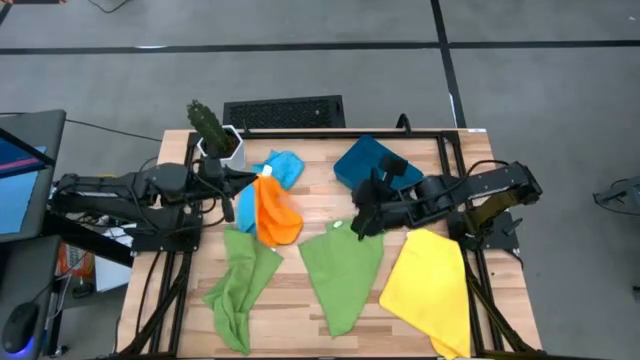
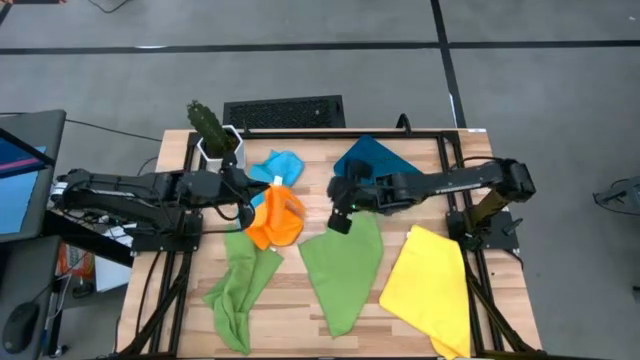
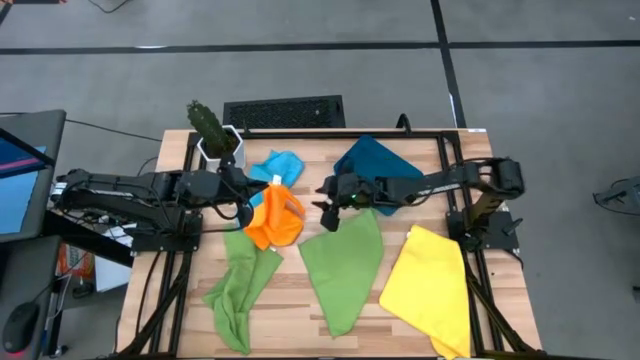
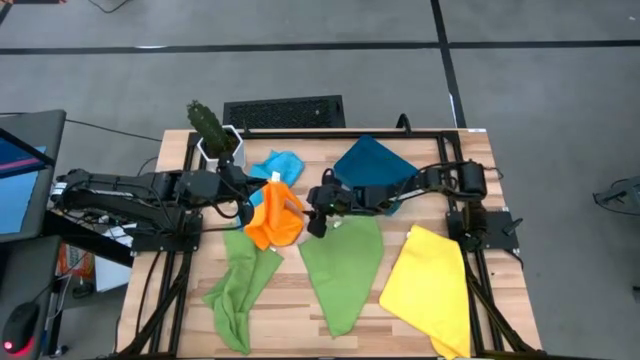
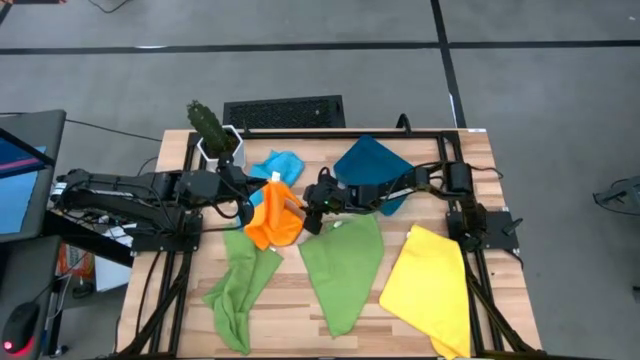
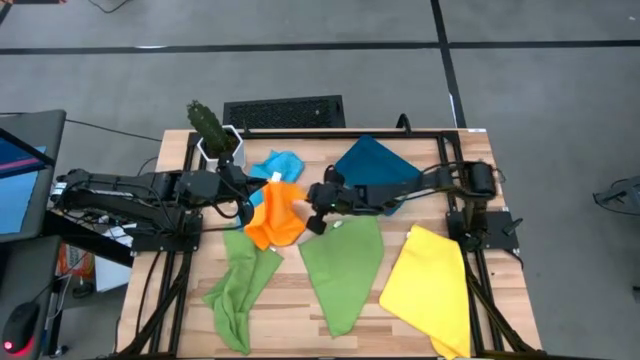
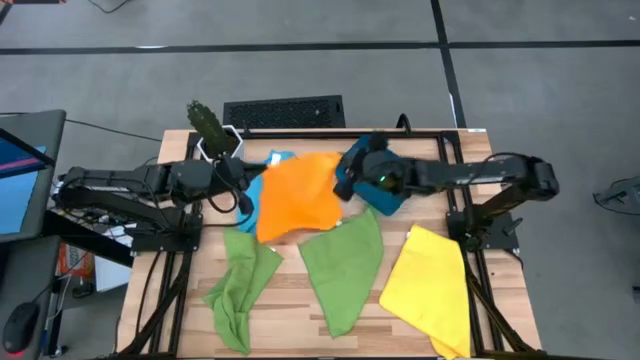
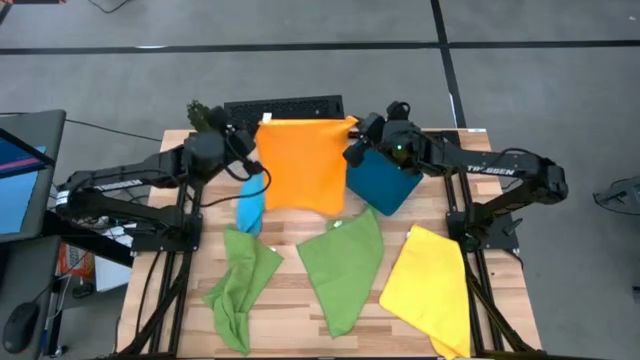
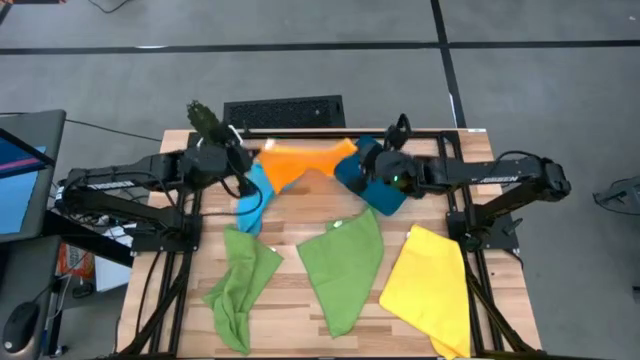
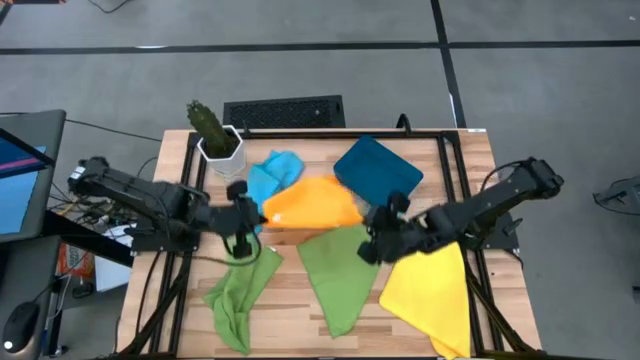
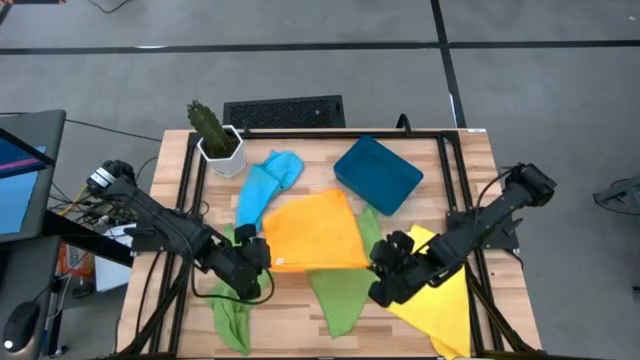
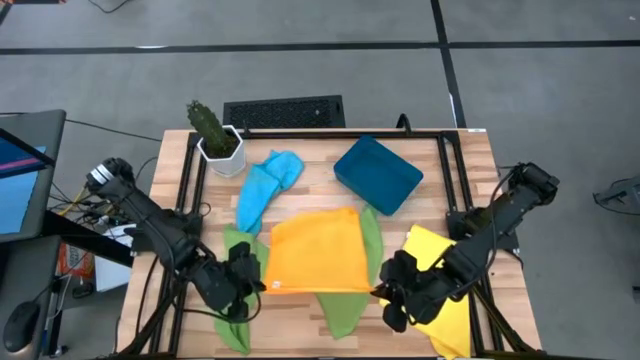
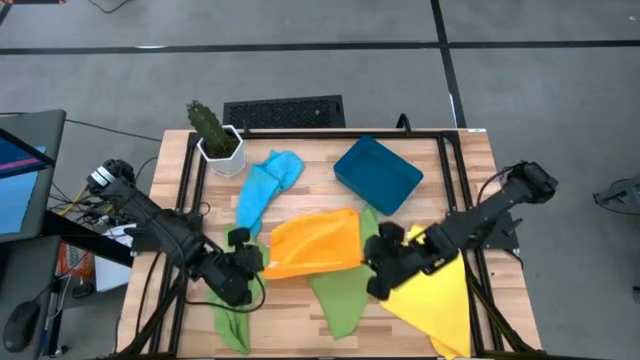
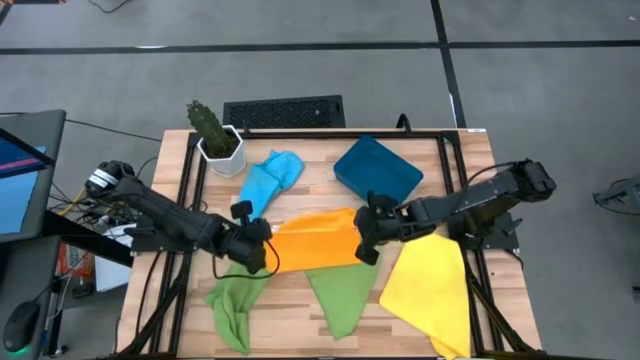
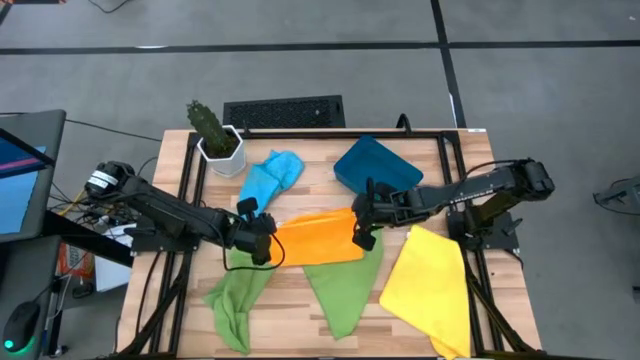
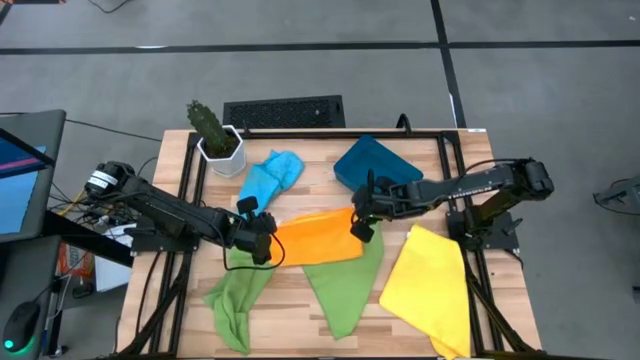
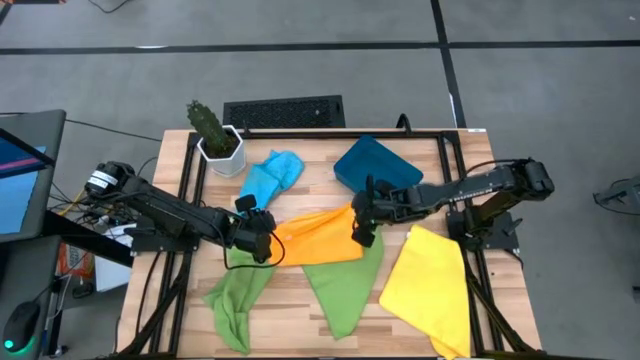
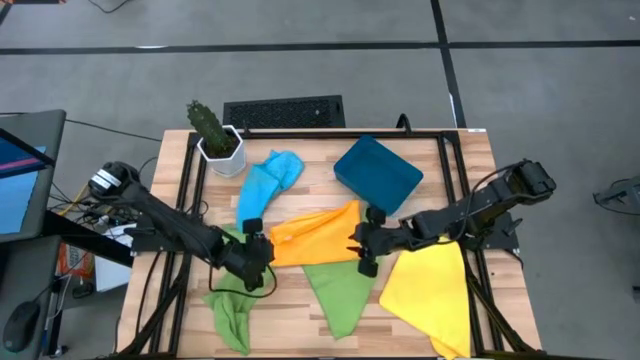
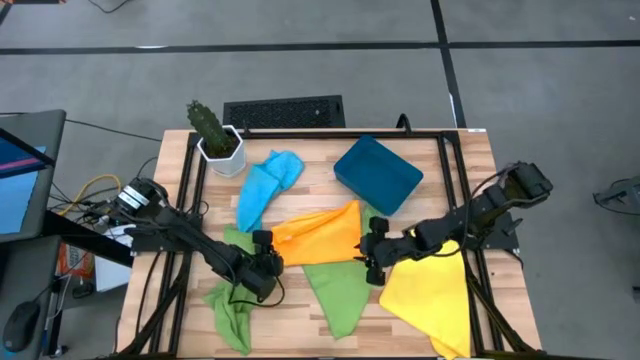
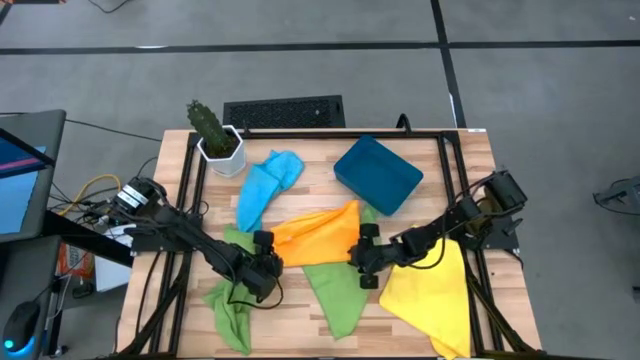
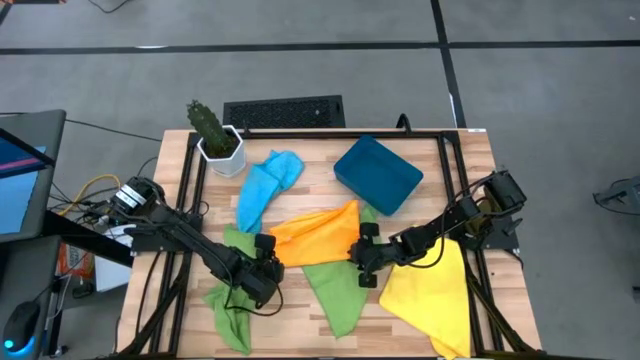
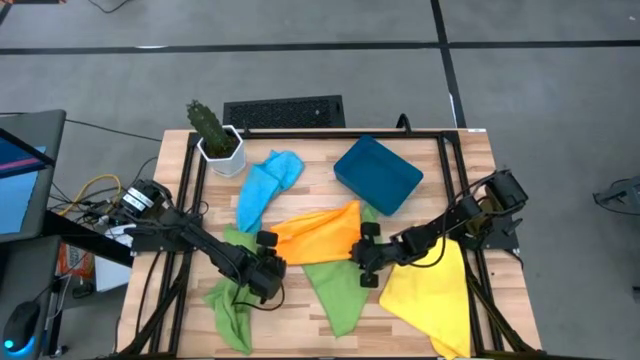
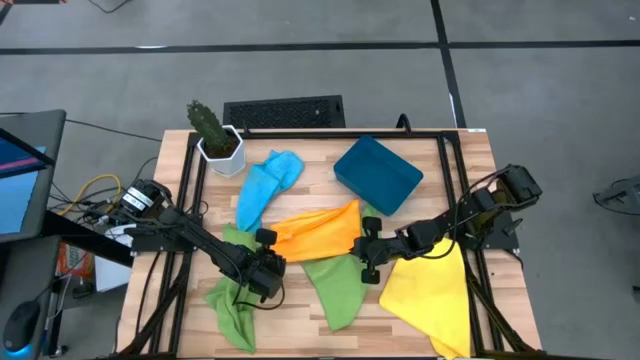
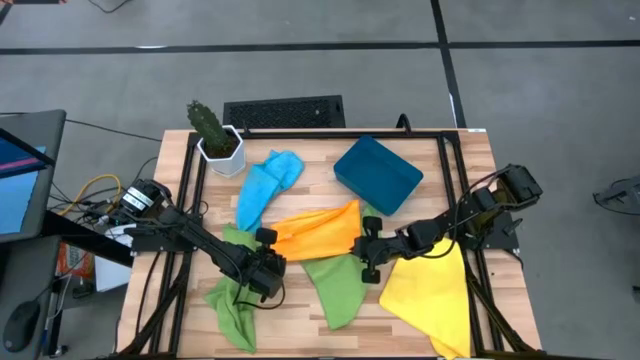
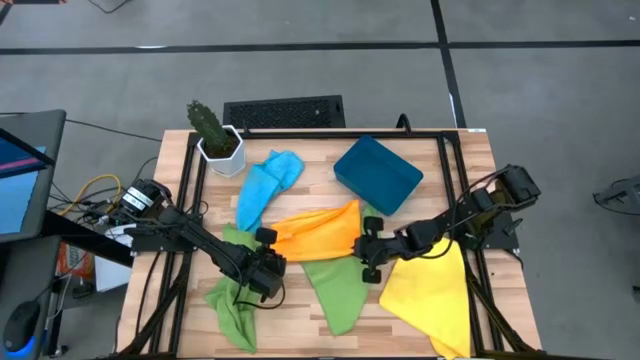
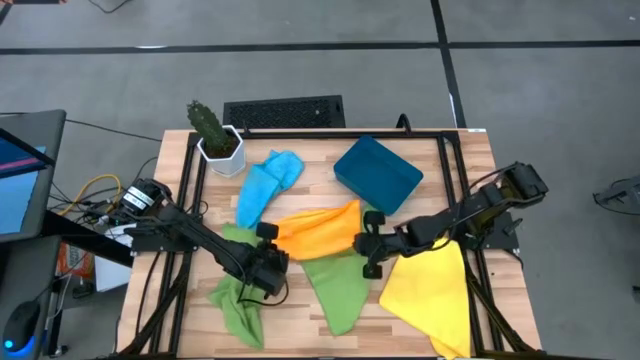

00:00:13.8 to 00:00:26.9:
Task: Fold microfiber towels
Fold the orange microfiber towel
